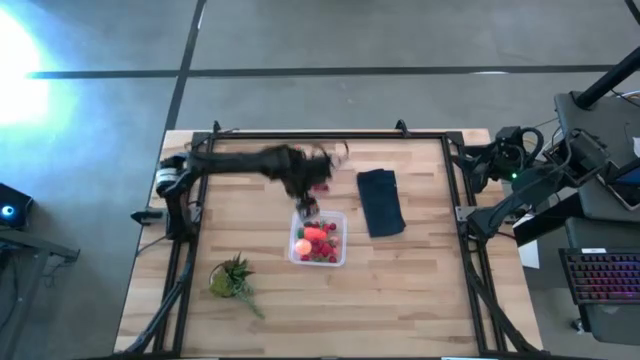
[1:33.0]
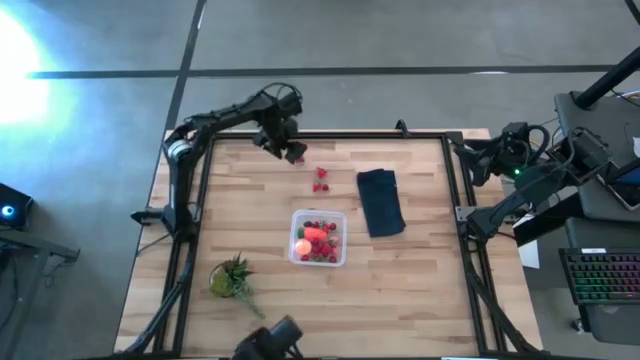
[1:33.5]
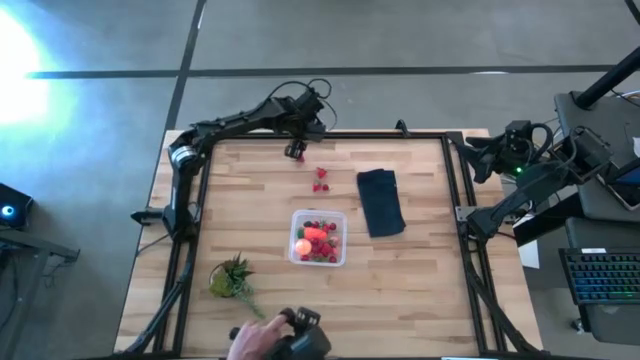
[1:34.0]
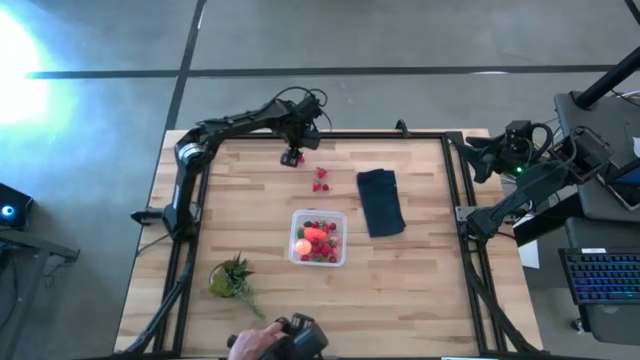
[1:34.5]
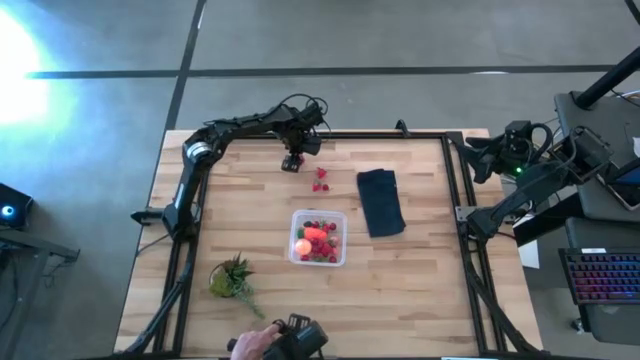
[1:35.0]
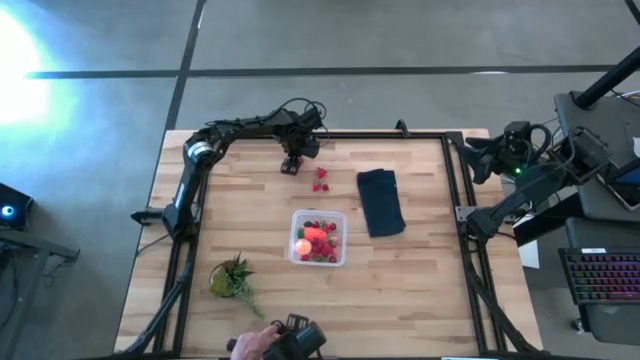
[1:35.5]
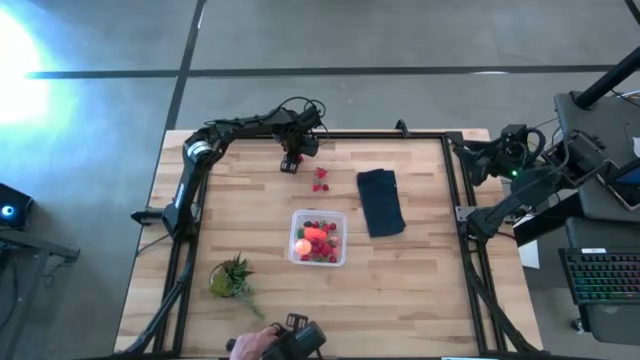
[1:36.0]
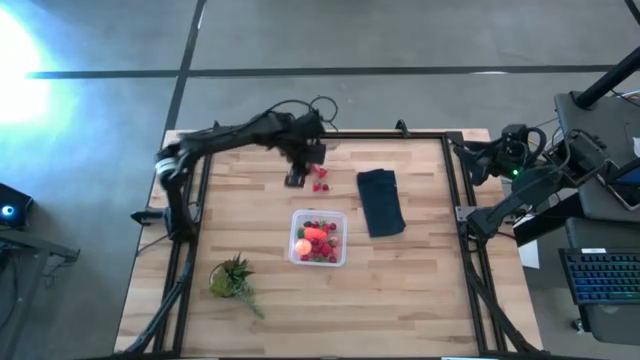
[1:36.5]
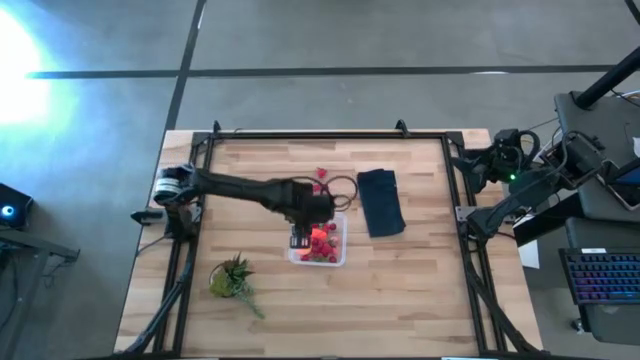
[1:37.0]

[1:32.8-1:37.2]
Task: Pick and placing Produce into tupperware
Put the red strawberry into the transparent bin

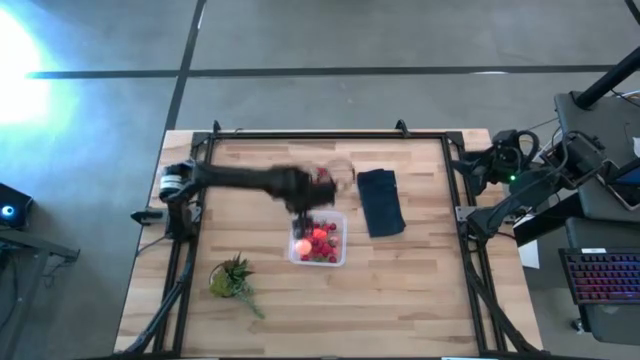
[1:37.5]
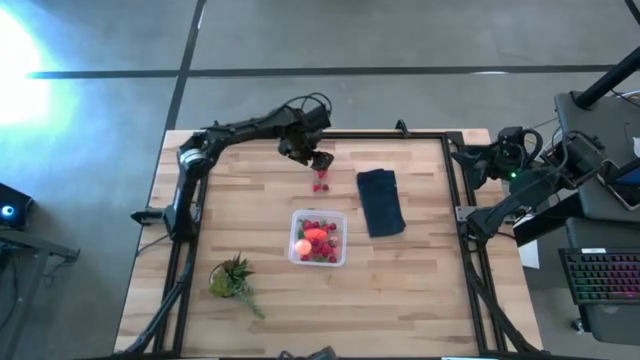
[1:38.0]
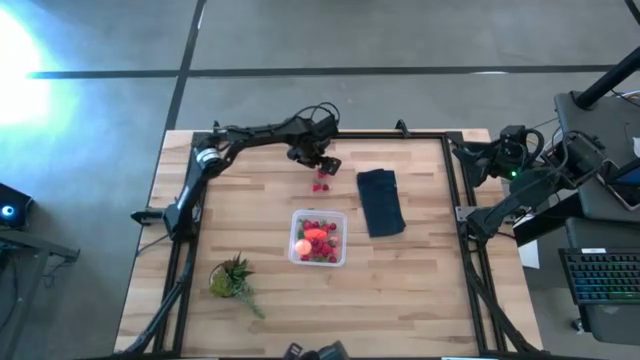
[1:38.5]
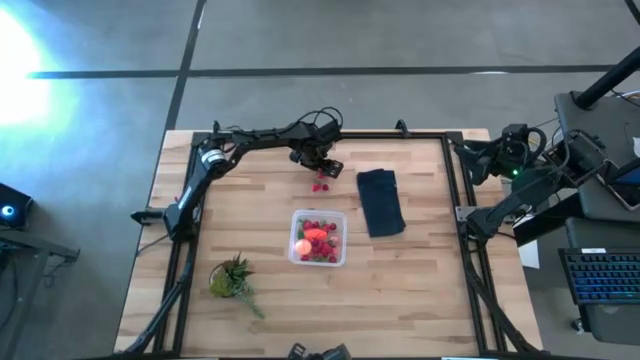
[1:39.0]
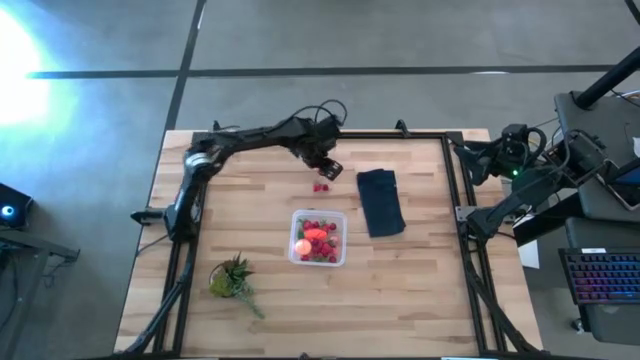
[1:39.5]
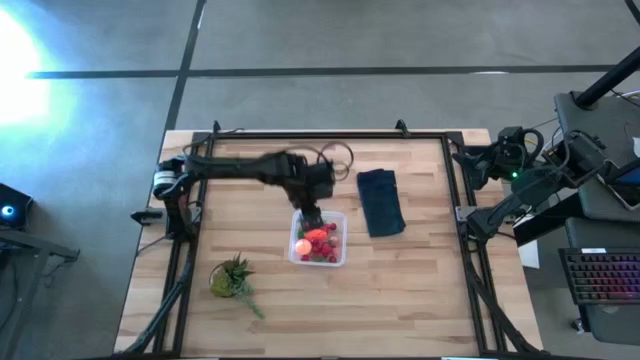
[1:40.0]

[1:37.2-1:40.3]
Put the red strawberry into the transparent bin

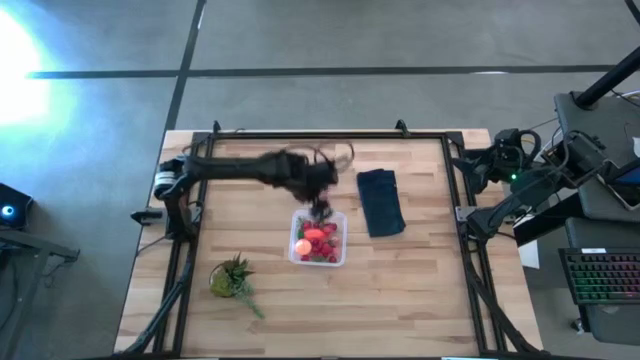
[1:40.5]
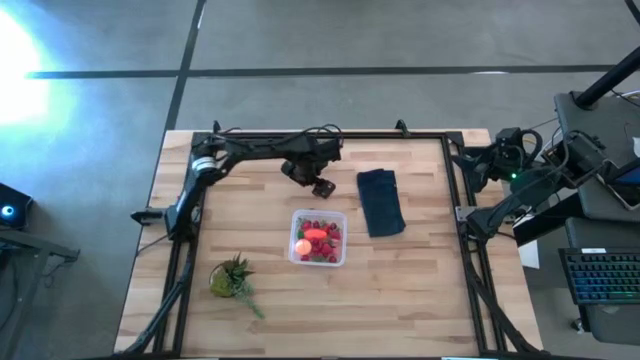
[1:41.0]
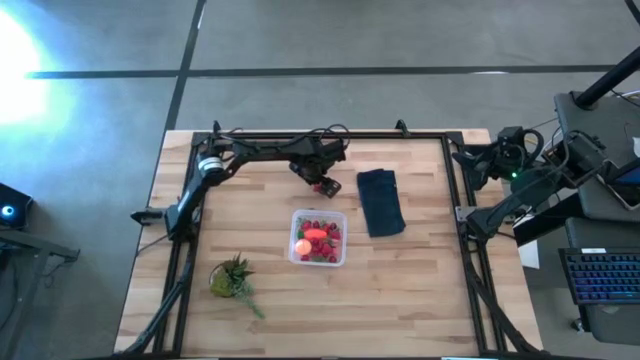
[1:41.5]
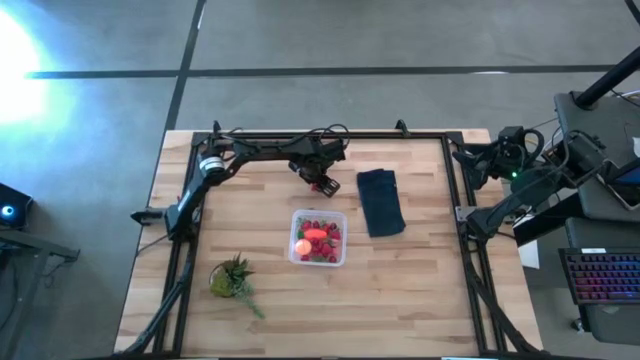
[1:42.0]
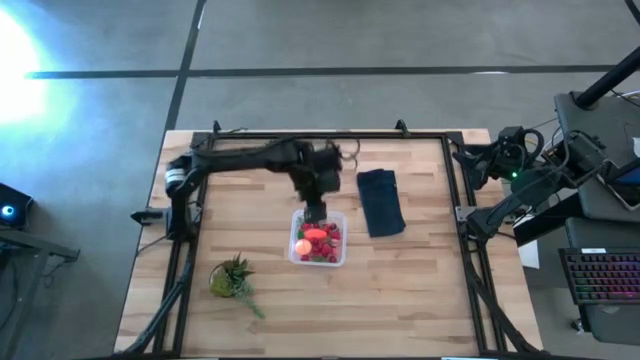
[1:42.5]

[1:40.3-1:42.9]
Put the red strawberry into the transparent bin

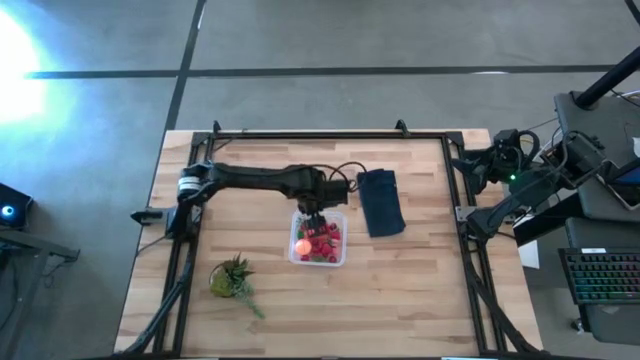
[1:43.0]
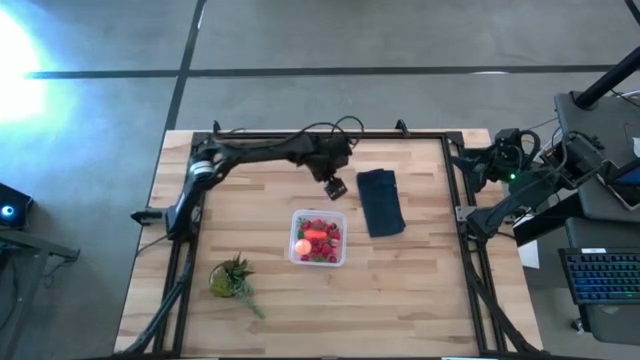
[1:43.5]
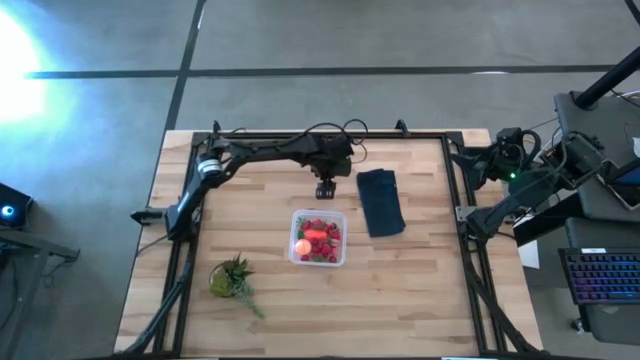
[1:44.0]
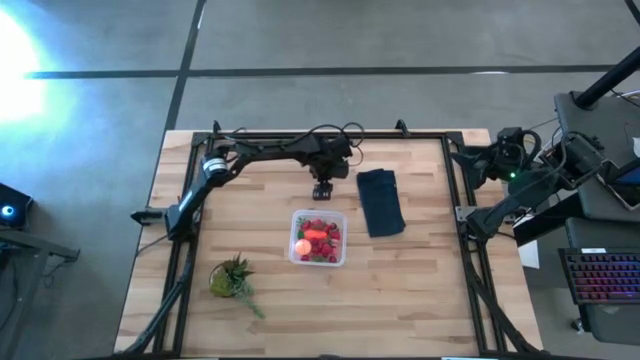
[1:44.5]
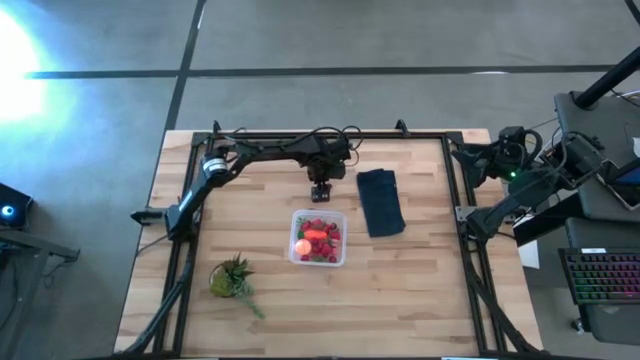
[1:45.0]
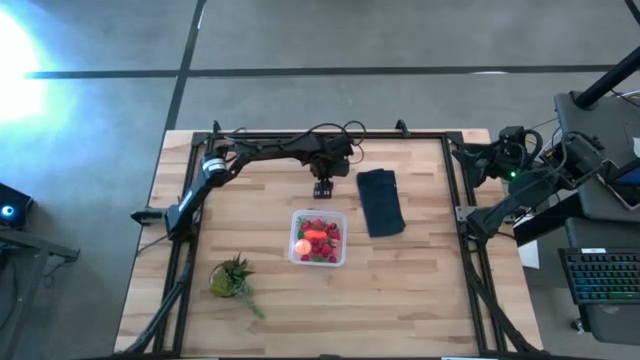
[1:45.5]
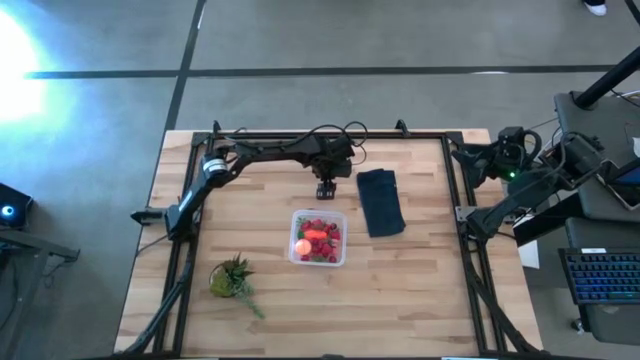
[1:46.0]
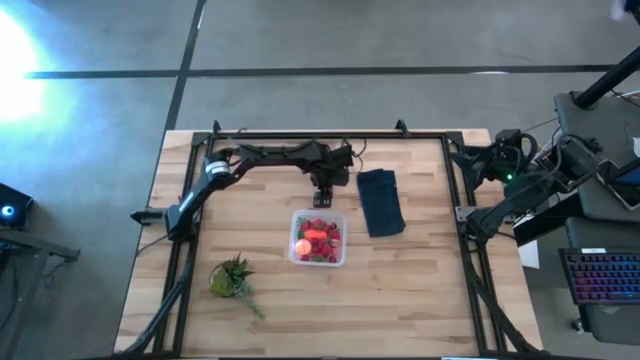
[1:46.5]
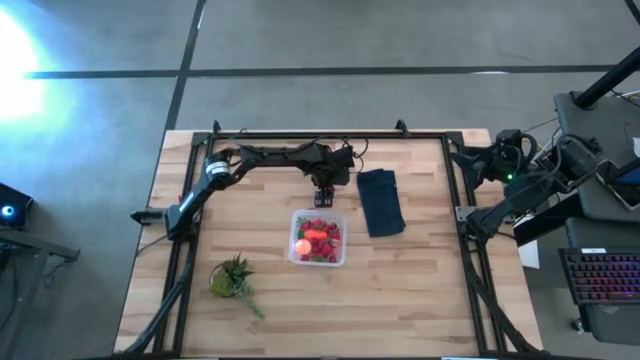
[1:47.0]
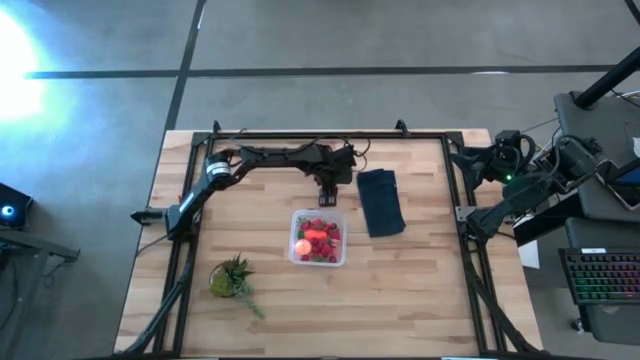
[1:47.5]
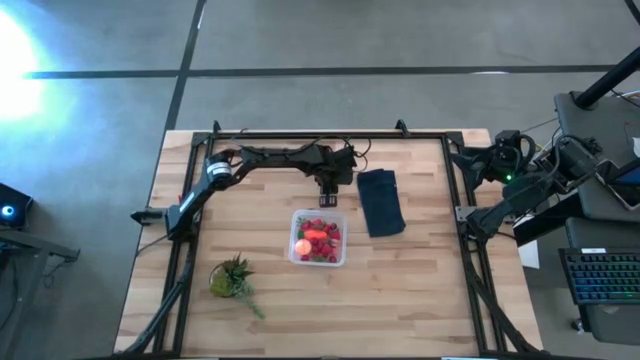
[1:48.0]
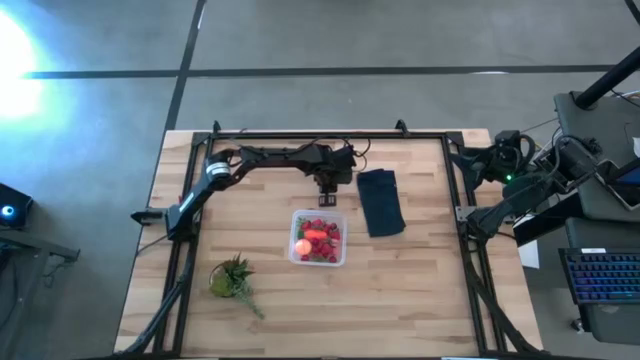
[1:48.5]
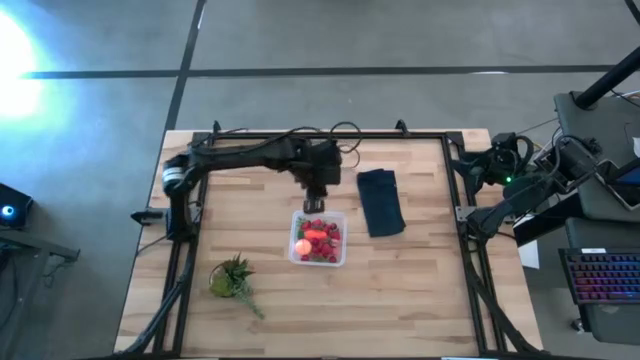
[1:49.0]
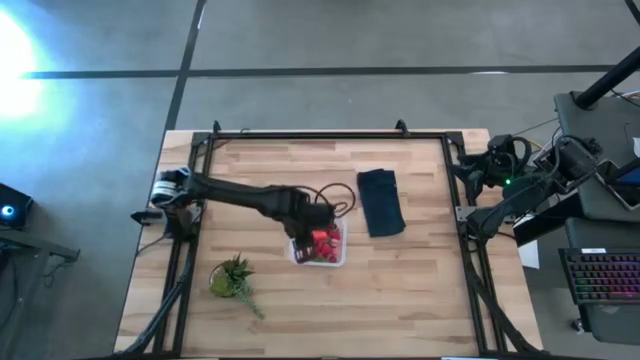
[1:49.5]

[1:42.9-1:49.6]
Put the red cherry into the transparent bin

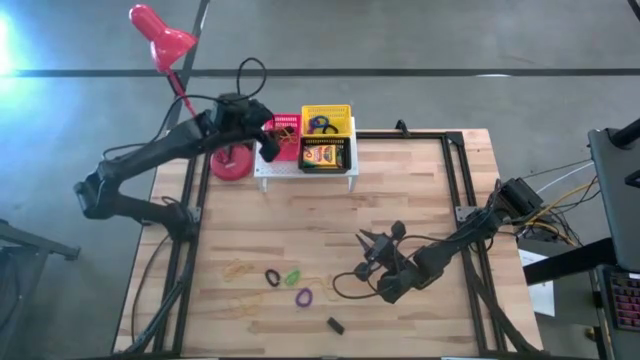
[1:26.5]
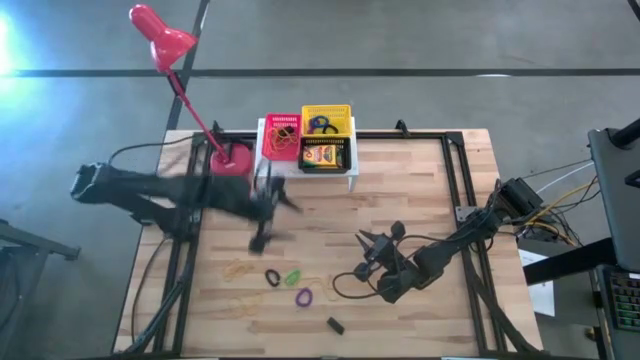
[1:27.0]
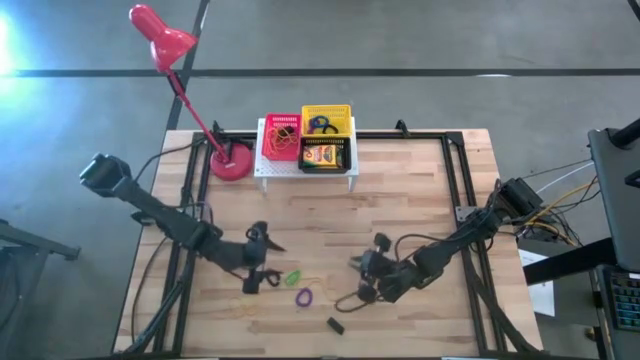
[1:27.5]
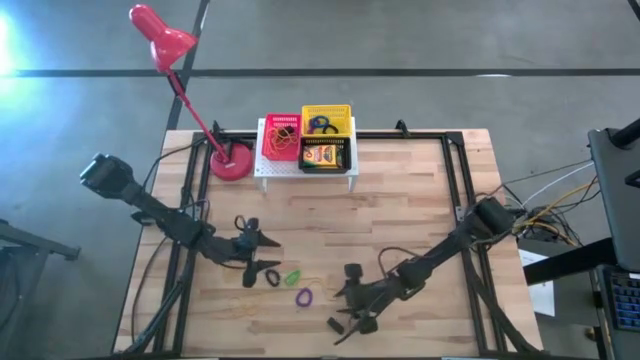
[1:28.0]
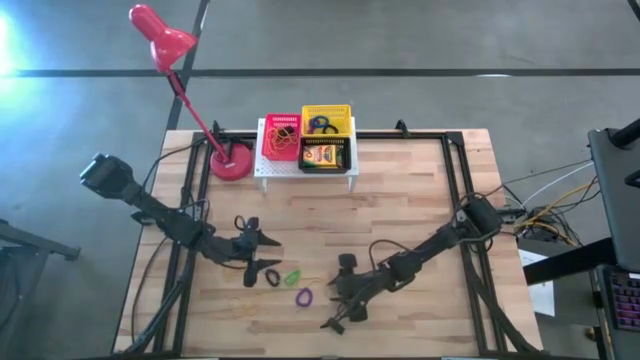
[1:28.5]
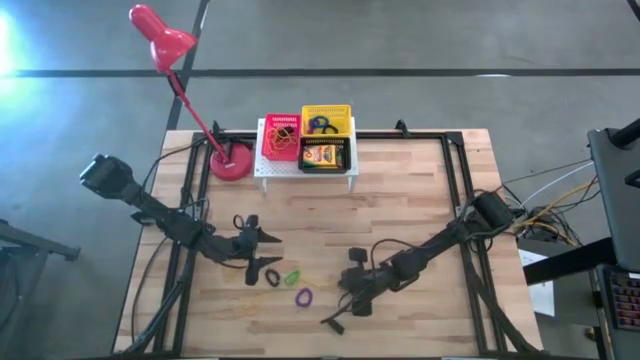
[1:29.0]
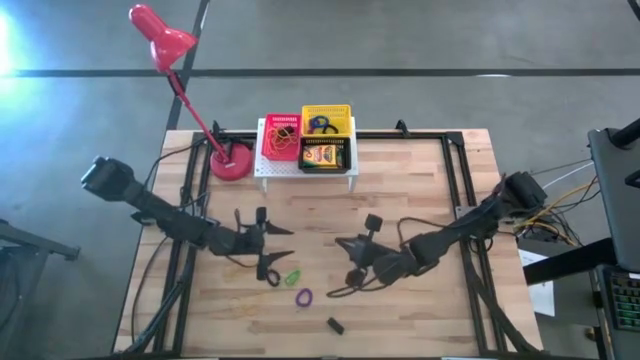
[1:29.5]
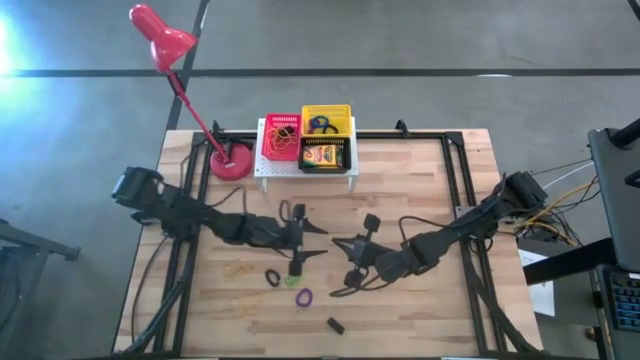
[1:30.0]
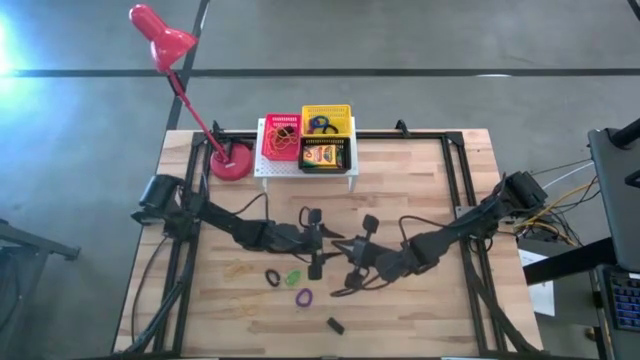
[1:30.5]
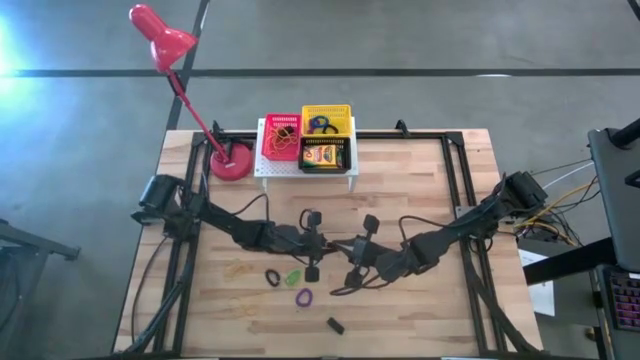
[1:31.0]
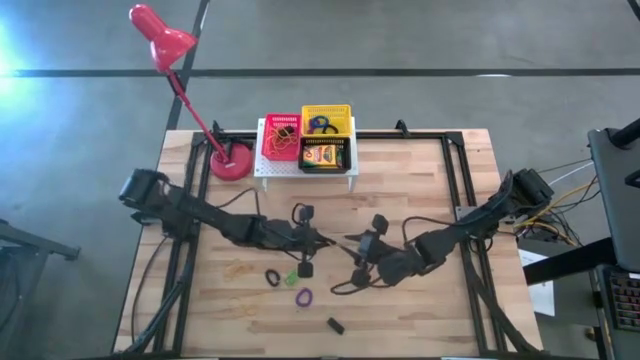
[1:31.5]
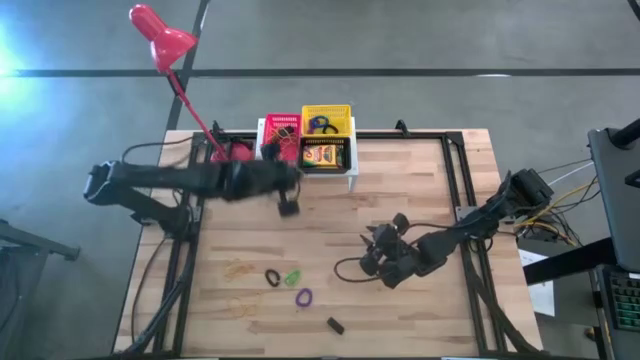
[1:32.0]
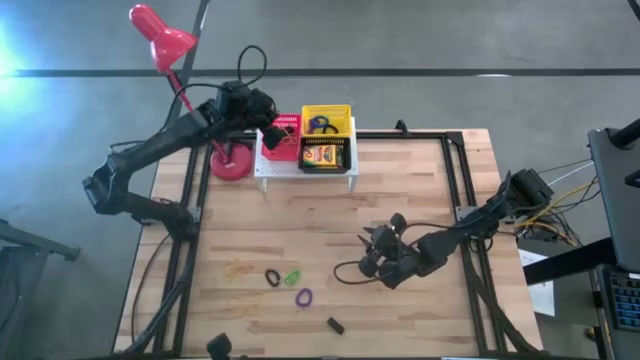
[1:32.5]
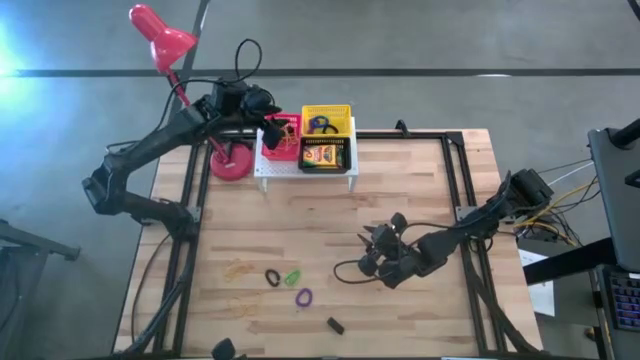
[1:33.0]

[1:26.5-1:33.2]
Task: Pick & Place Office Desk Supplies
Put the right yellow rubber band into the red bin on the shelf
